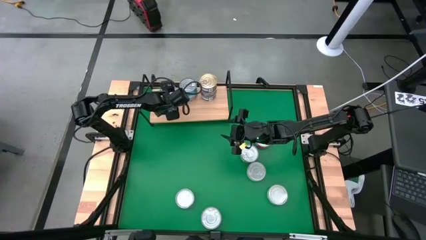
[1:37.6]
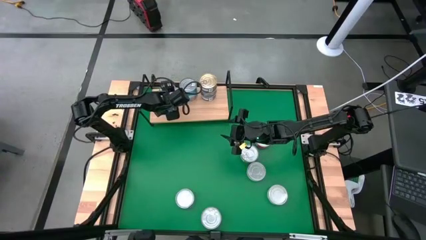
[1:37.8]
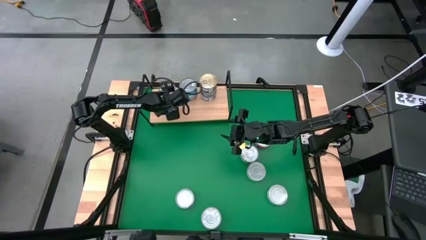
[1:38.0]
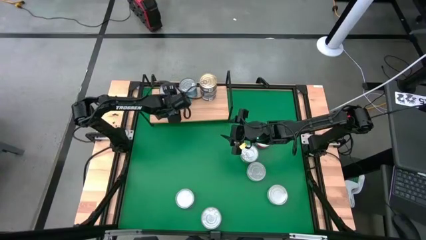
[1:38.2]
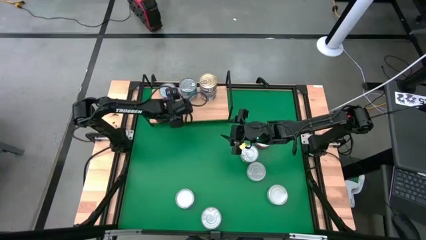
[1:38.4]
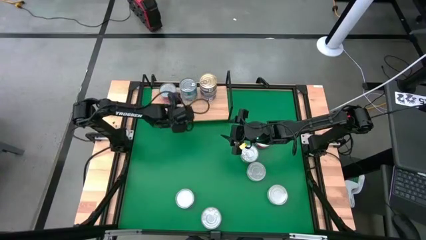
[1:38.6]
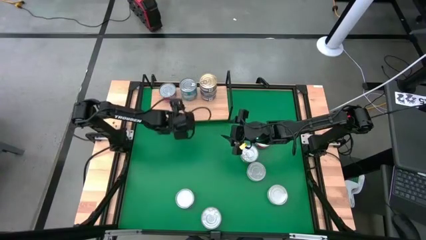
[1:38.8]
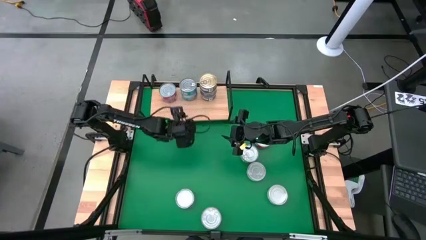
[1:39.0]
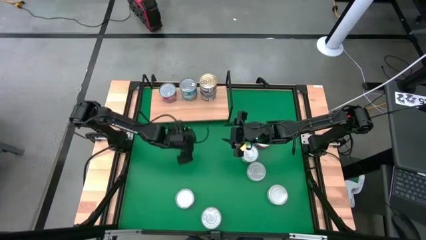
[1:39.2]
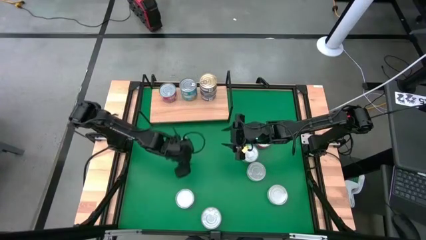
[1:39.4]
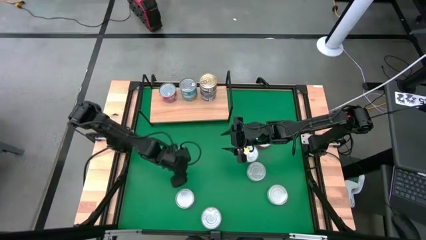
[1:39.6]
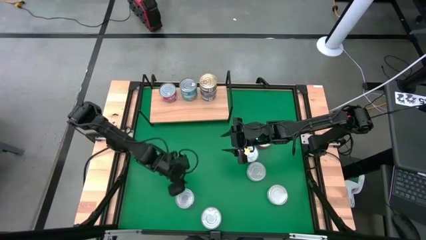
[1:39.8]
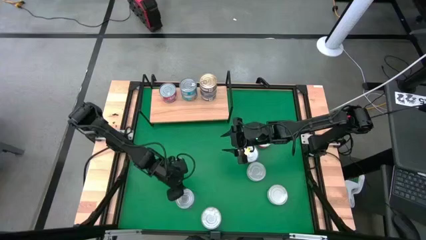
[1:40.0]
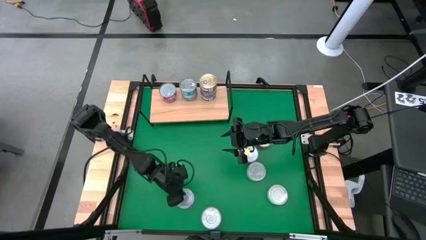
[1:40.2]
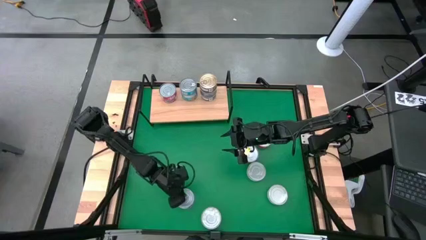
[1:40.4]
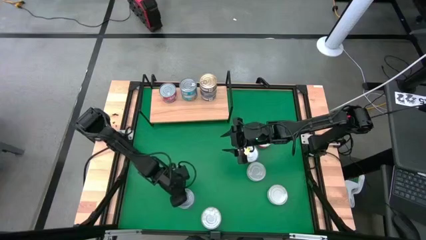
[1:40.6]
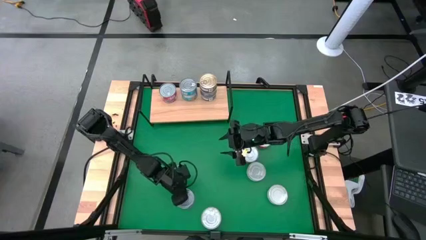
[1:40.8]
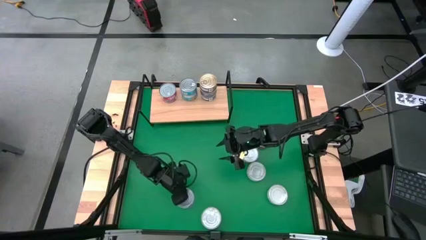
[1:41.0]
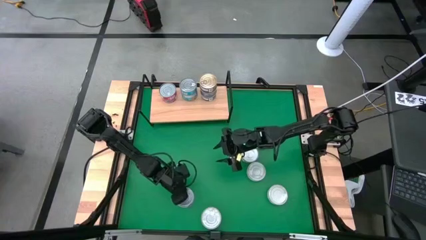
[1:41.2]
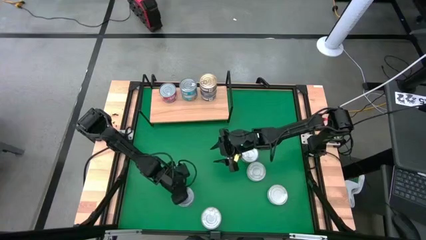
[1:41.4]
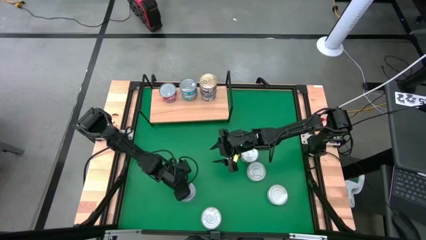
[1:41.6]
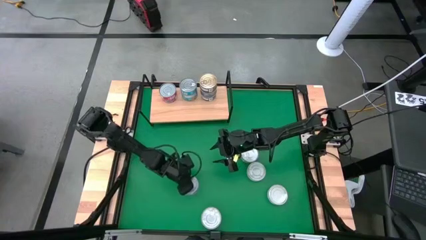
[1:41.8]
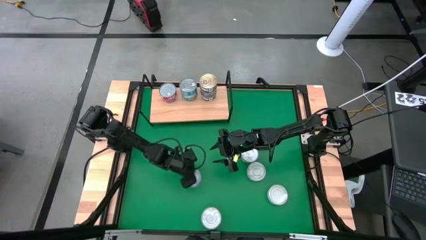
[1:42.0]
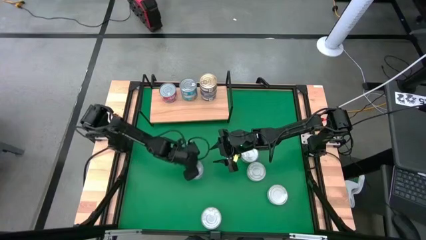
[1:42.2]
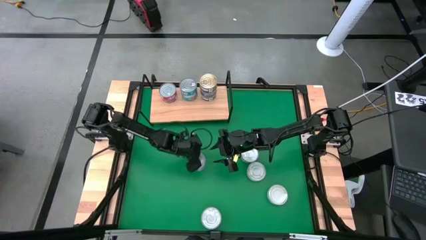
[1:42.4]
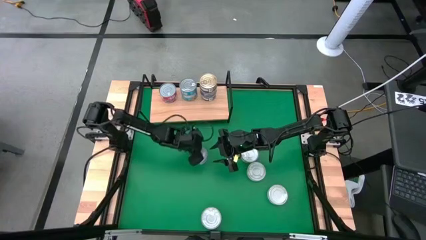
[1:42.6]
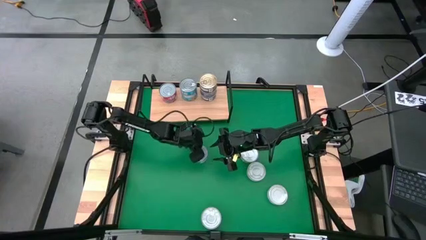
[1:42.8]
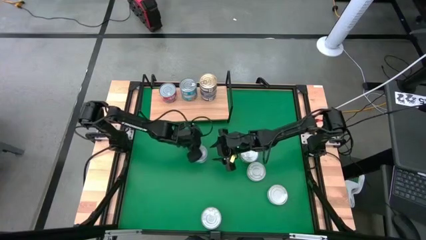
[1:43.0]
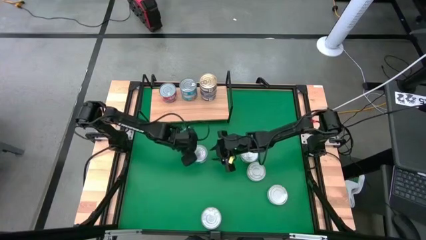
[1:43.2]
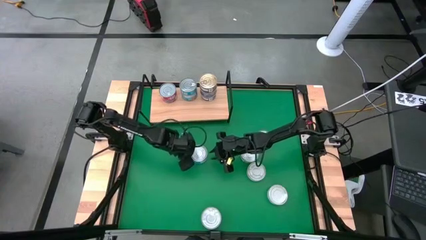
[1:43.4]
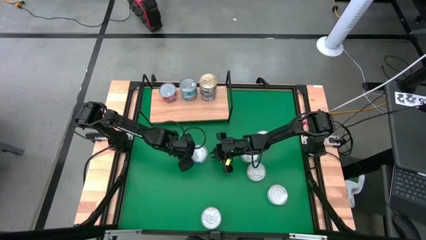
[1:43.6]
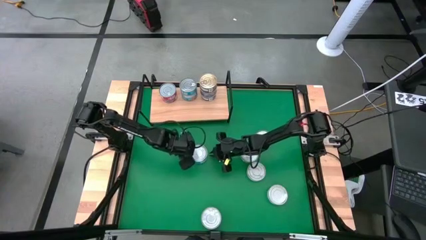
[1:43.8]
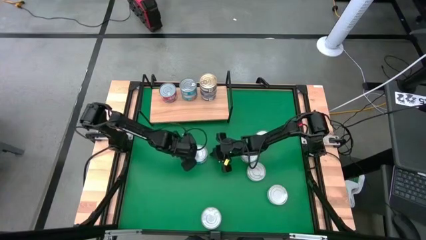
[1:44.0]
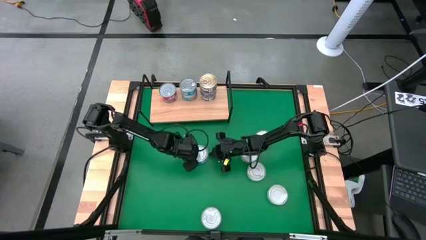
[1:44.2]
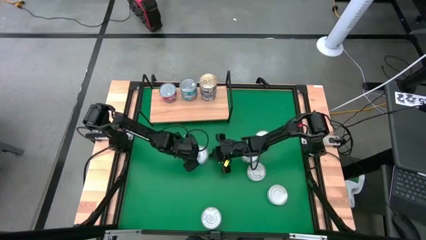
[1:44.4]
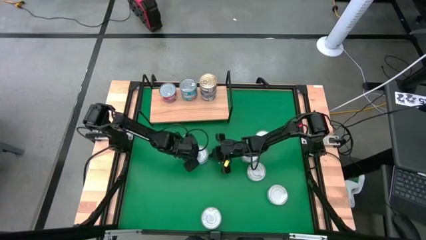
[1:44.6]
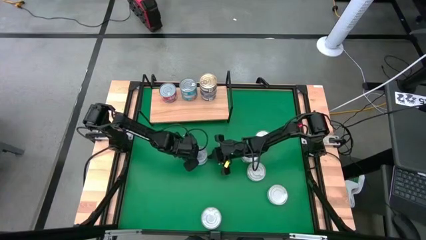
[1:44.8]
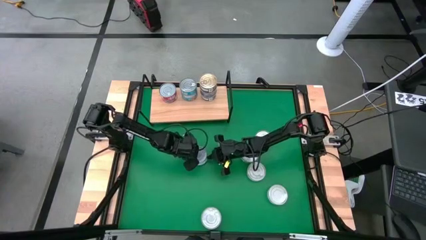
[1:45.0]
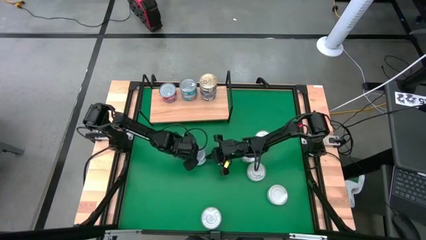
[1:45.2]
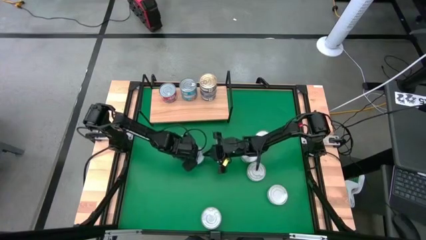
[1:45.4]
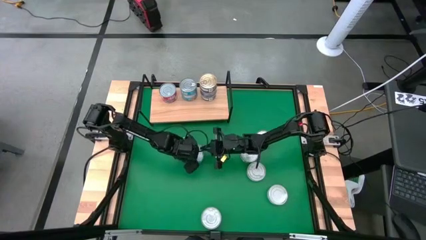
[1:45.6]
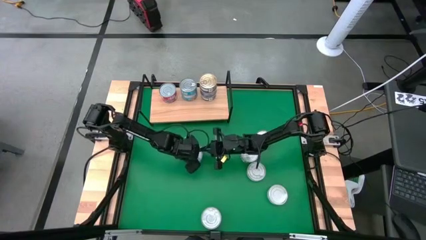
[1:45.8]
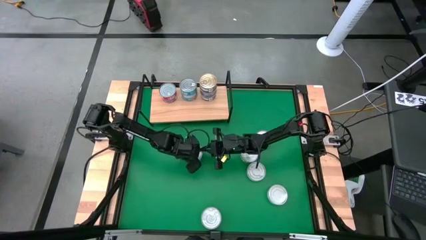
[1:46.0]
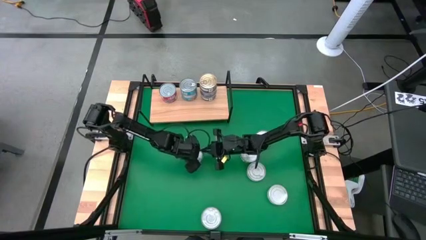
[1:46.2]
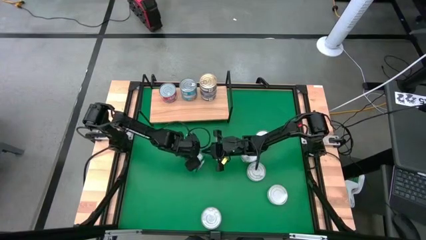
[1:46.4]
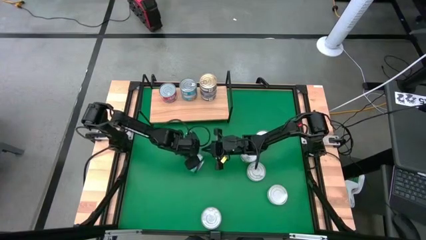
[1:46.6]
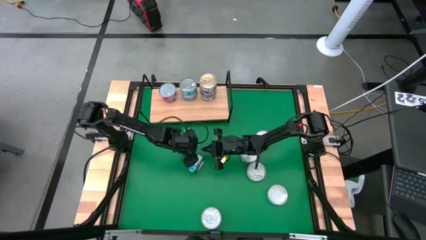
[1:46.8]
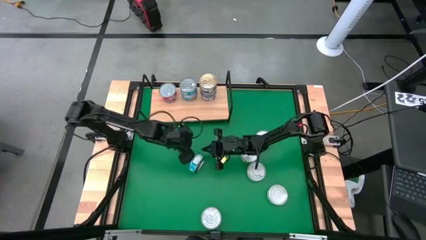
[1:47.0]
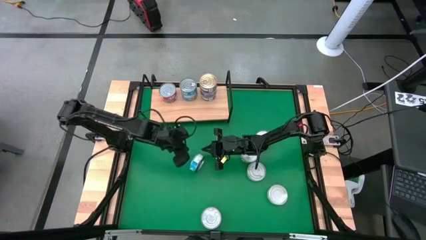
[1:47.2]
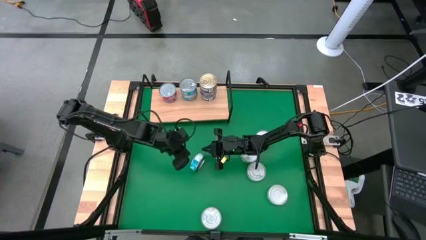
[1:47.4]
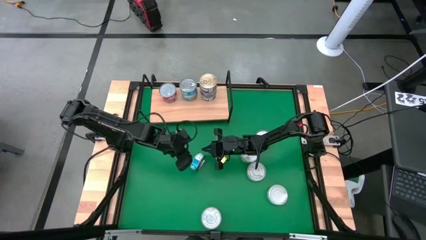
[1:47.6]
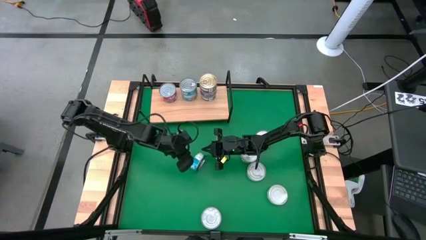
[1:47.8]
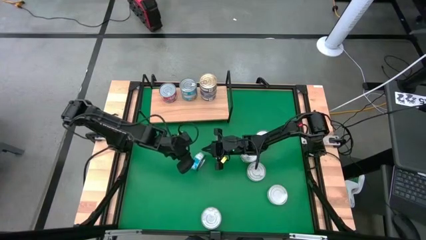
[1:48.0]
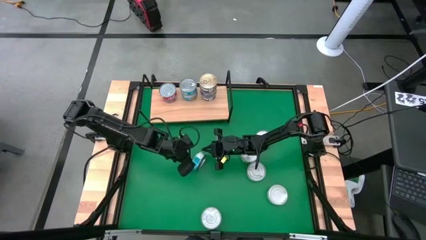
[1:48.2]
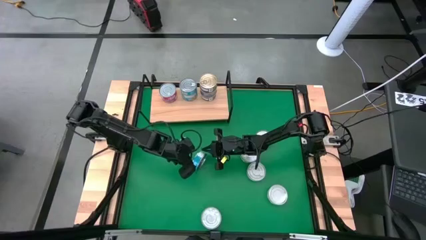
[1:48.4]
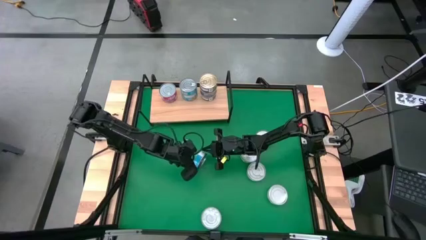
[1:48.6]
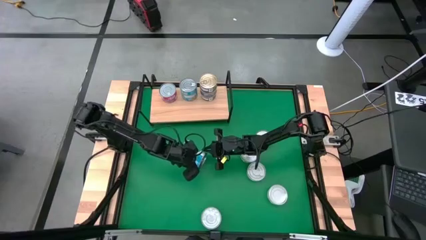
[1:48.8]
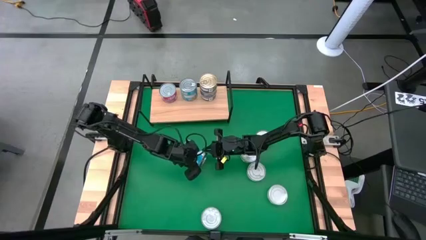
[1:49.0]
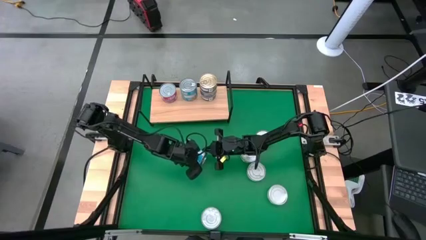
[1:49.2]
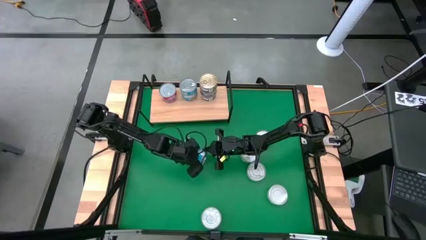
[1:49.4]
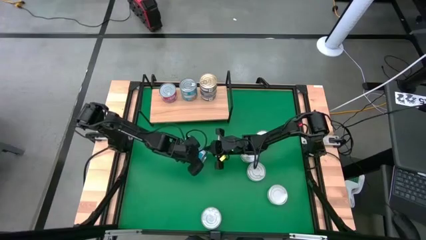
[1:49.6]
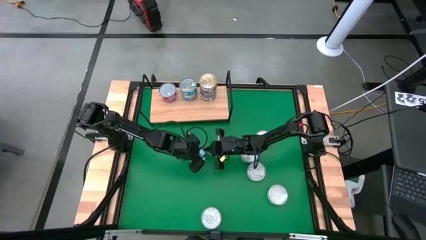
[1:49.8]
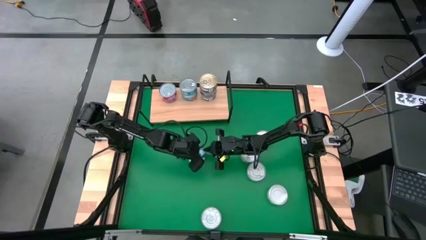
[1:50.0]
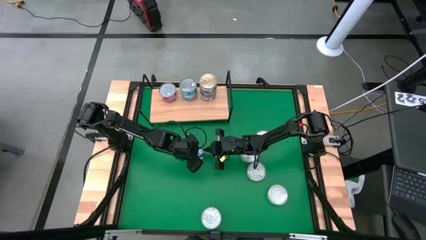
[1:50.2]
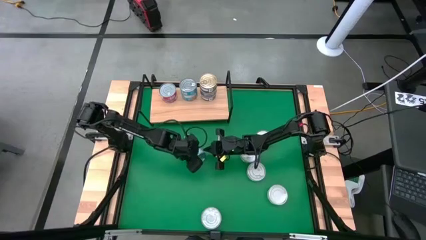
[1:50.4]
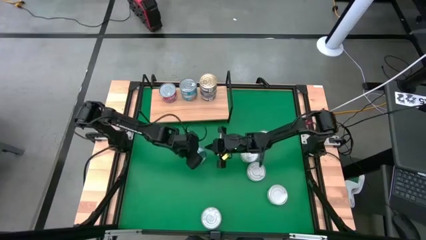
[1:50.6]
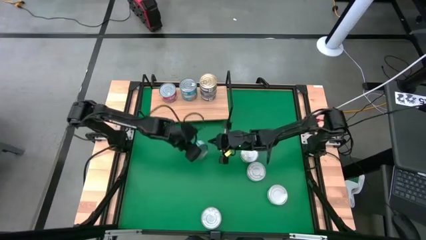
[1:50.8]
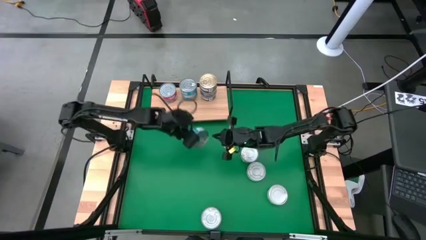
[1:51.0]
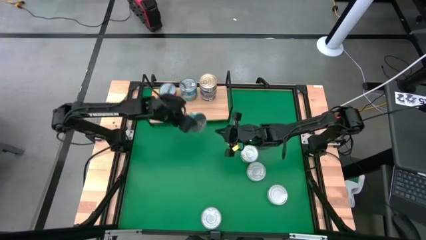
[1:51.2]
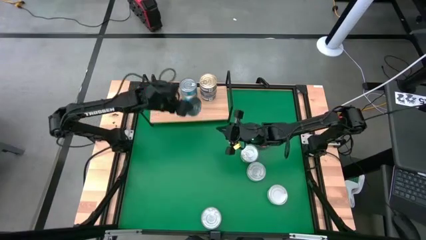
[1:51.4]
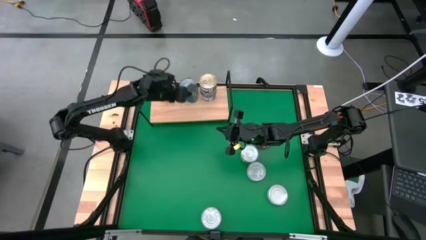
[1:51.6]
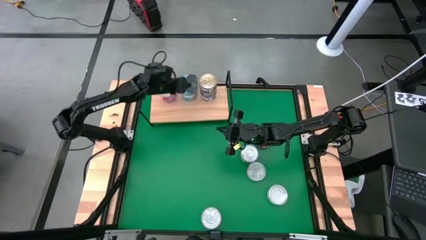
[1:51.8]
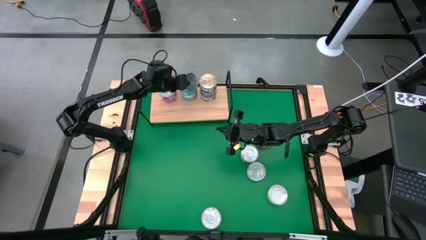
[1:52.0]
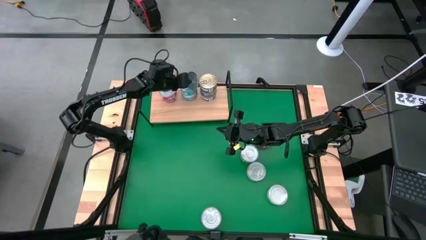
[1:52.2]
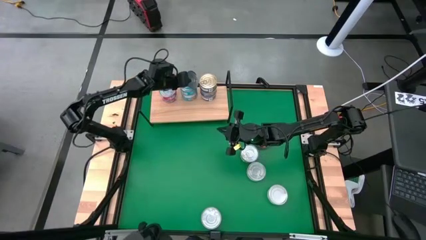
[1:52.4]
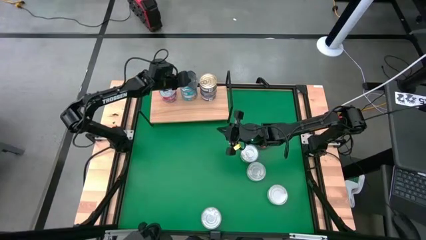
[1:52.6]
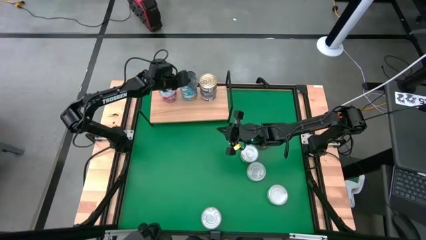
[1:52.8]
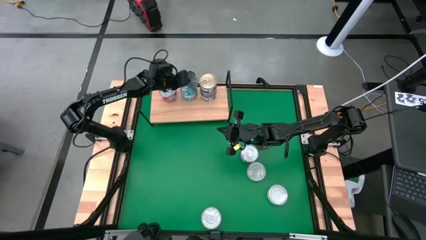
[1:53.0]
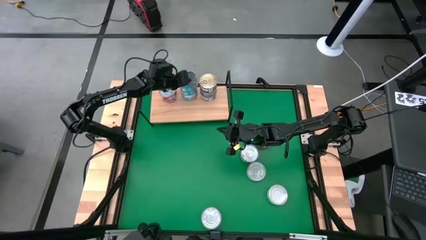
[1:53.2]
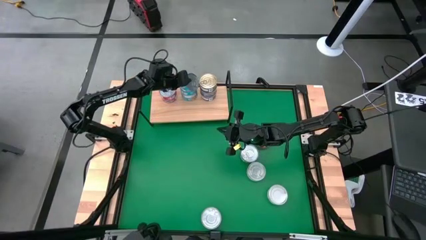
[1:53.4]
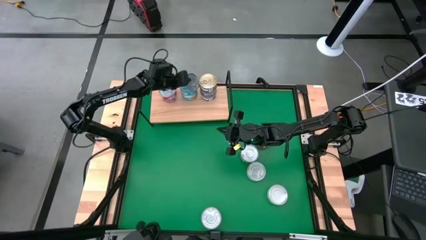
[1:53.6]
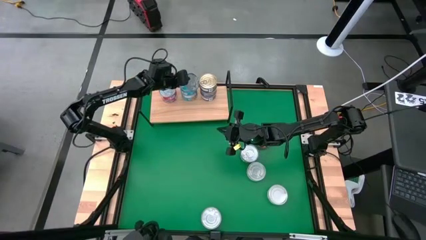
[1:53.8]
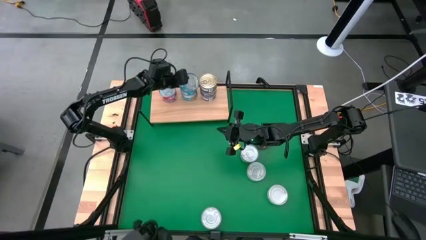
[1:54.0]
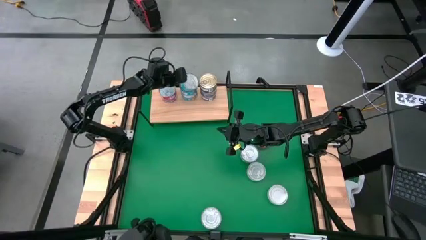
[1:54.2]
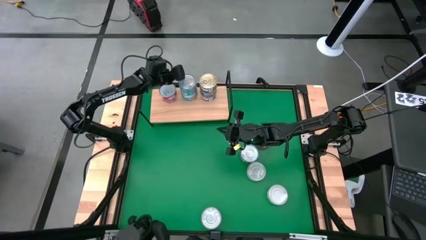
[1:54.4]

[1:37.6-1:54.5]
Task: Stack canned seafood by type on shelf
Stack the yellow blue tuna can on top of the other yellow blue tuna cans on the shelf

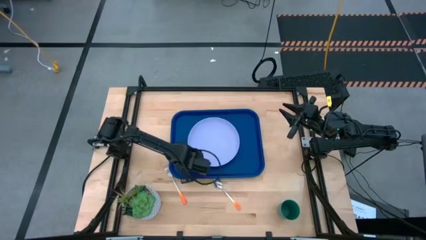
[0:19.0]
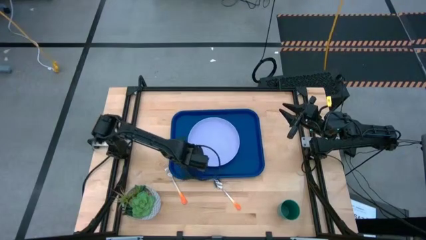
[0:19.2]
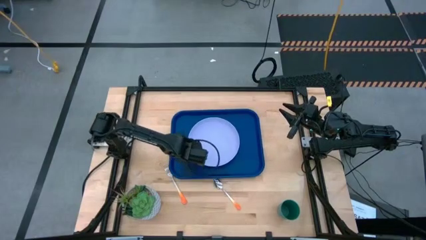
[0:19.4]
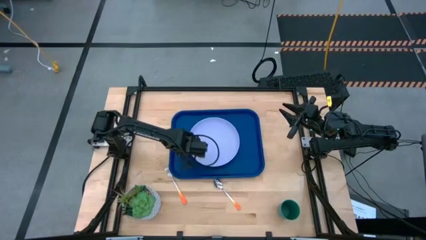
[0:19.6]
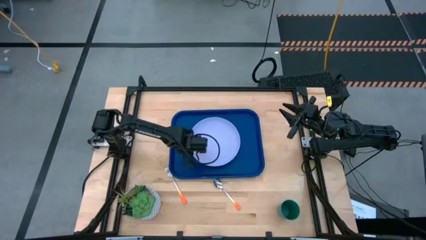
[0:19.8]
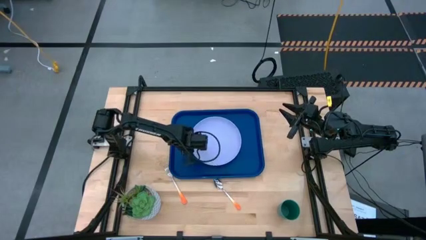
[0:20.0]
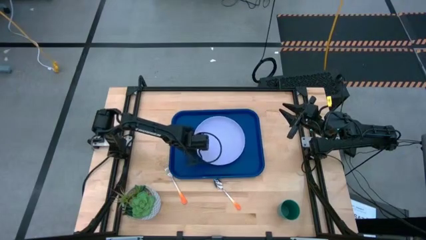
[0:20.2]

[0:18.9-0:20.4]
Task: Pick and place plate/cup/fork/spoon on tray
Adjust the blue plate on the serving tray
